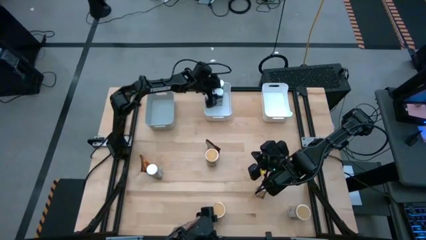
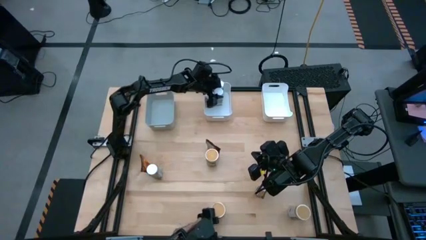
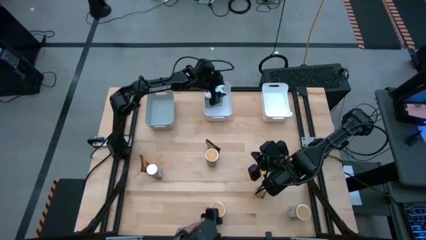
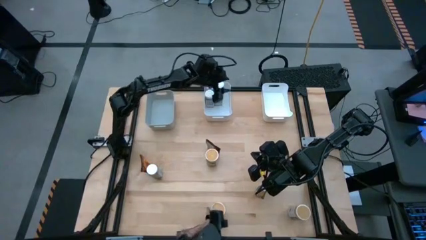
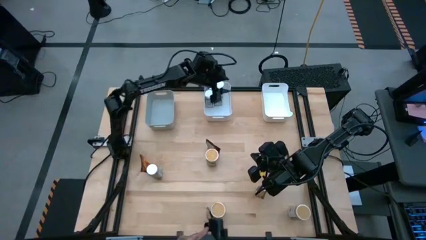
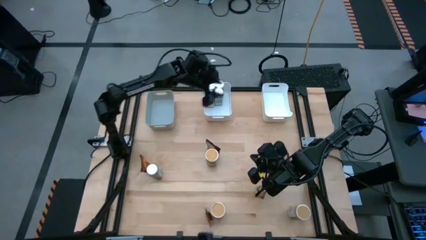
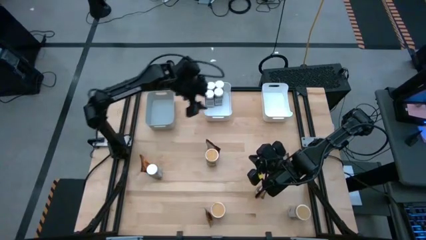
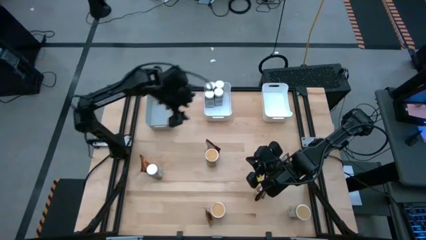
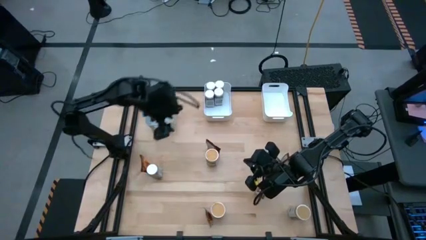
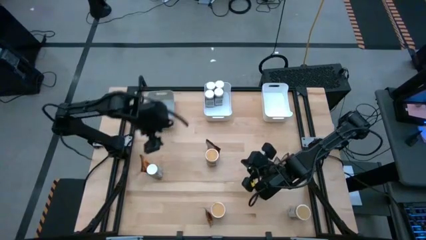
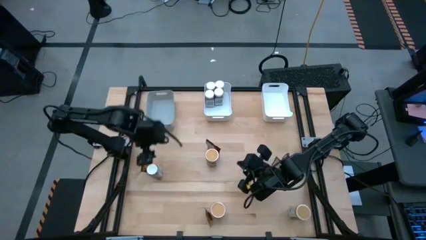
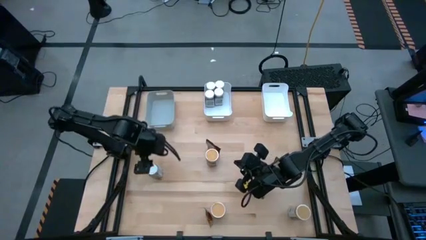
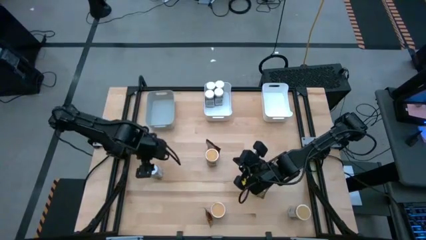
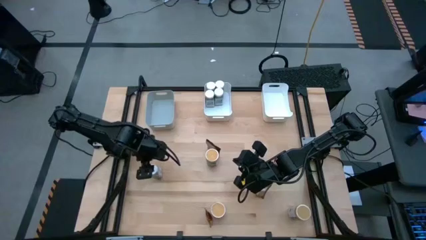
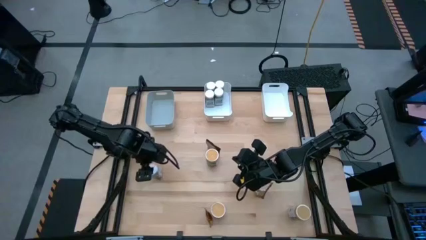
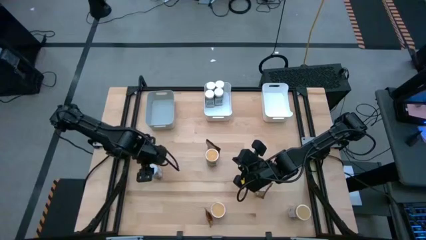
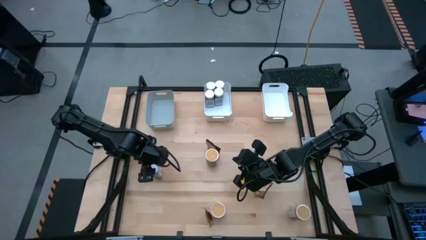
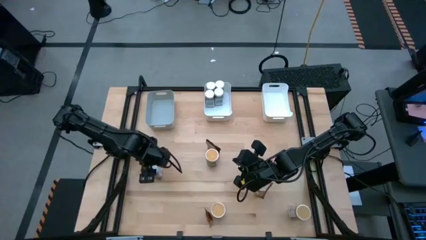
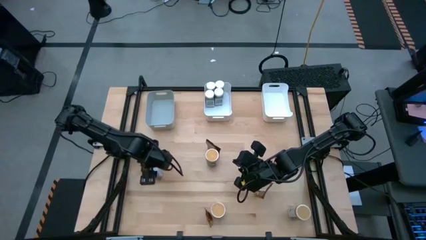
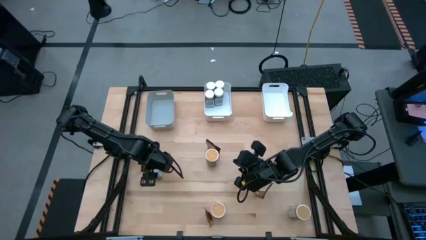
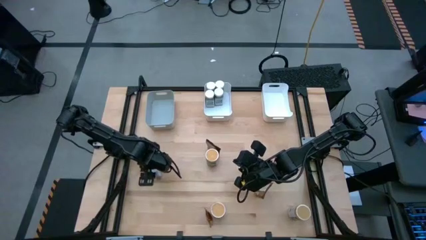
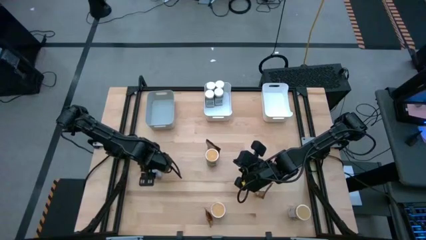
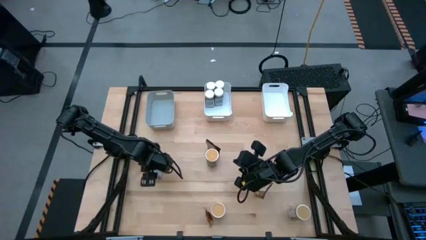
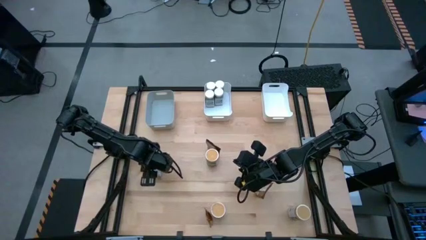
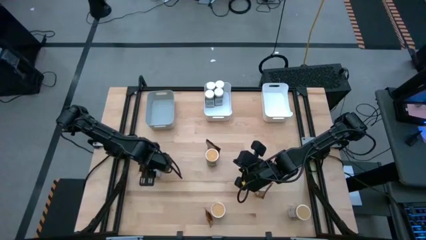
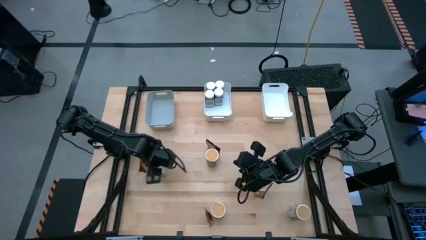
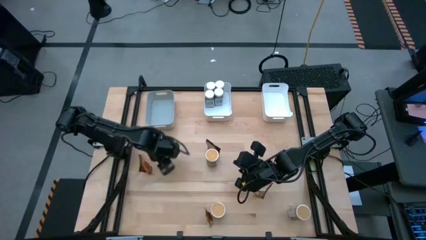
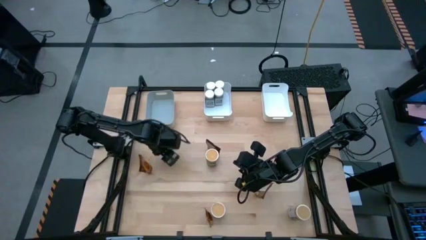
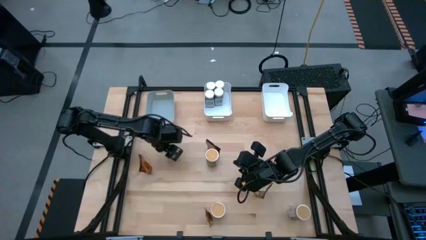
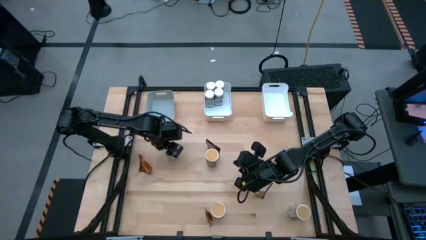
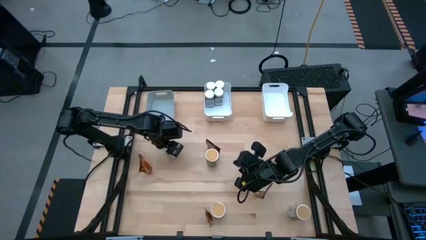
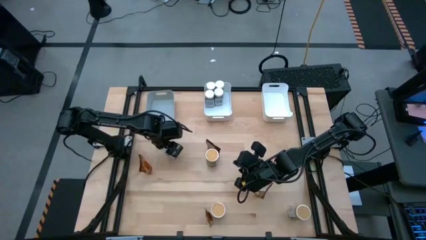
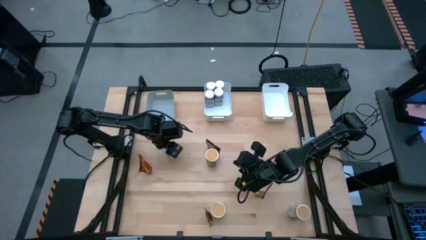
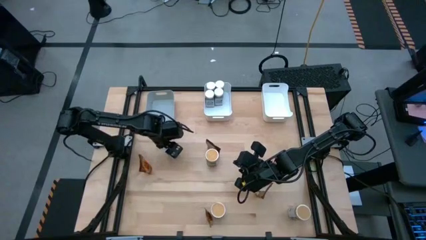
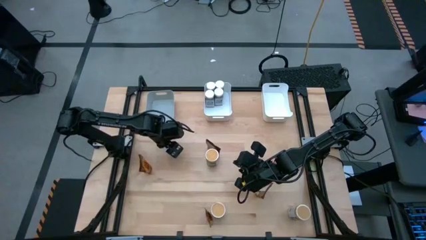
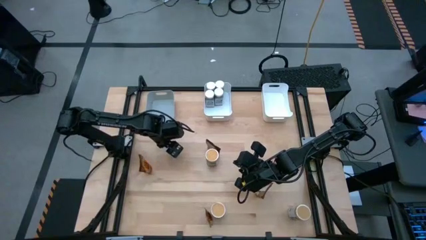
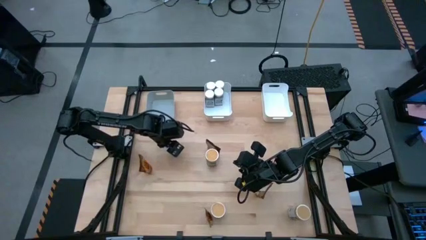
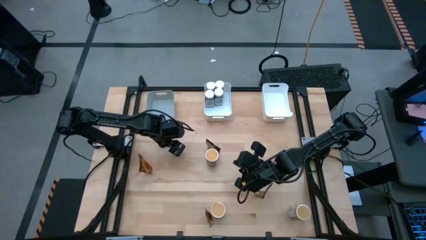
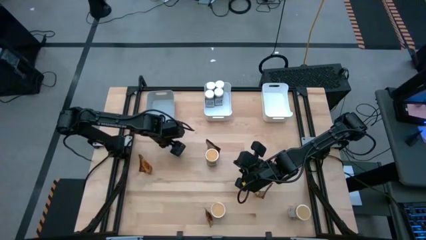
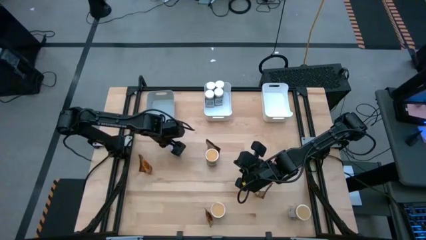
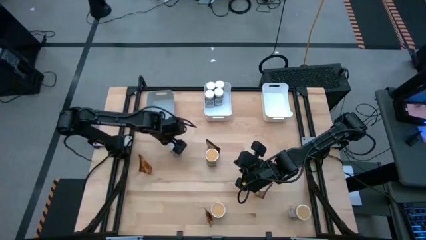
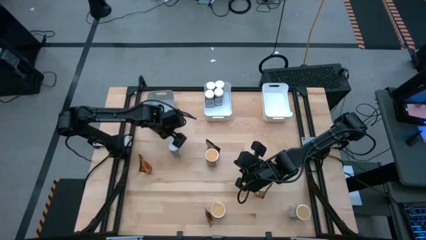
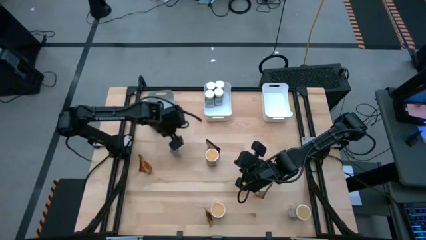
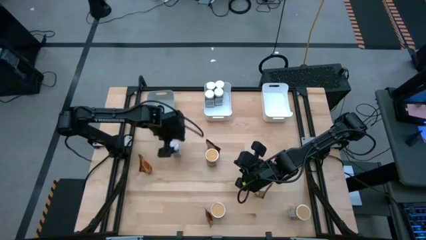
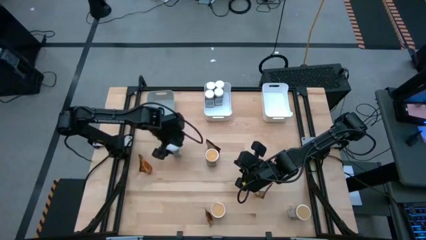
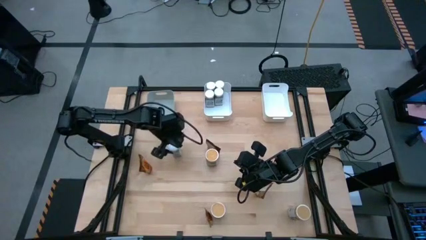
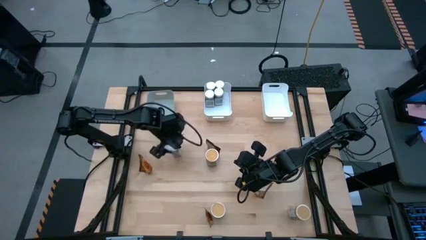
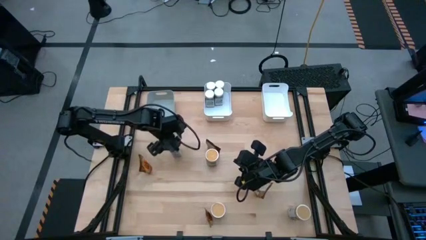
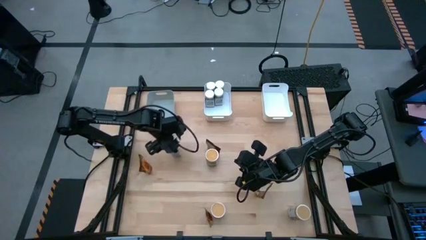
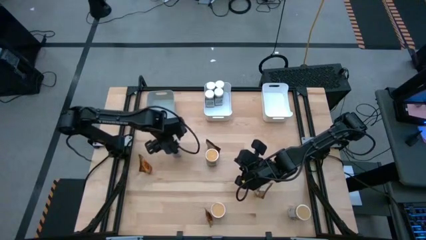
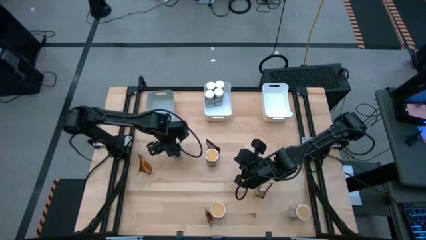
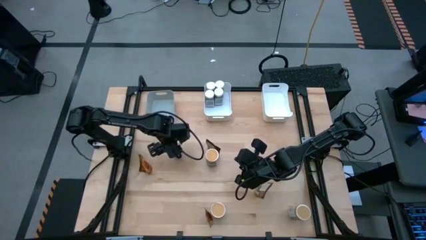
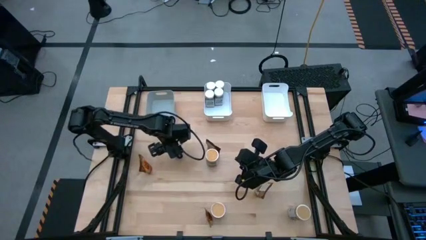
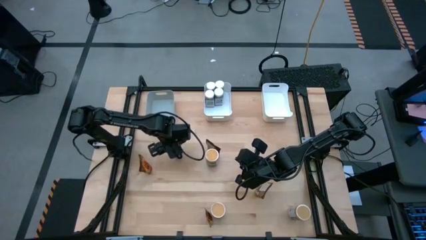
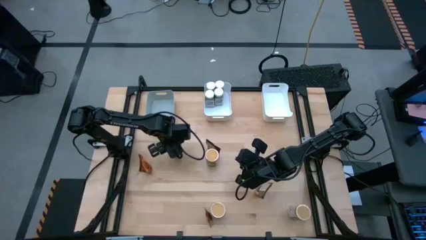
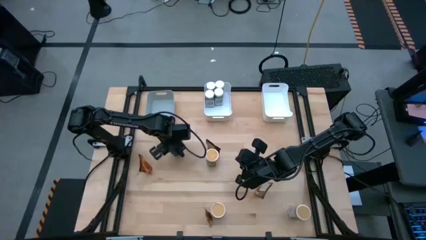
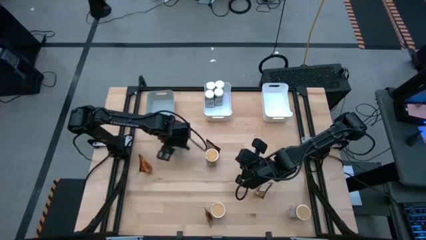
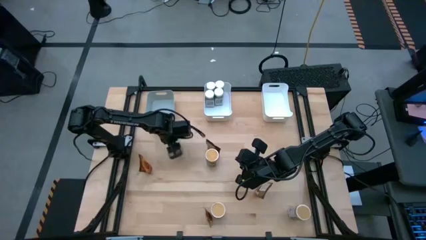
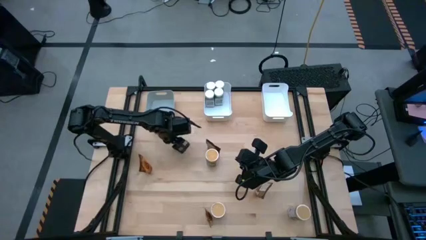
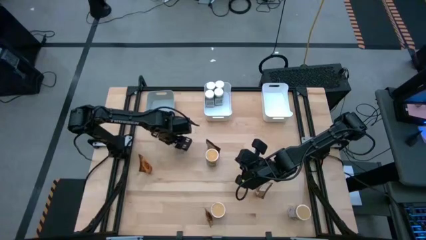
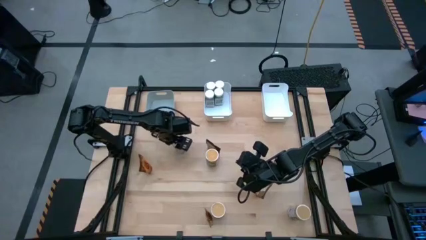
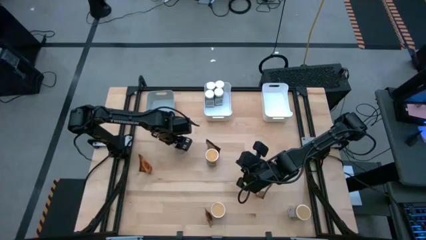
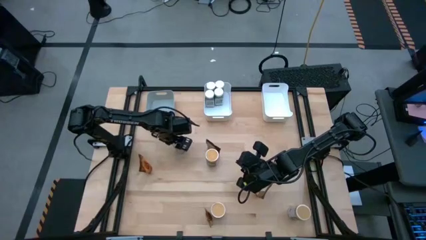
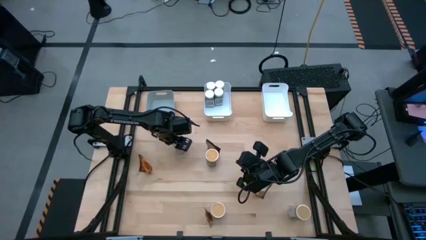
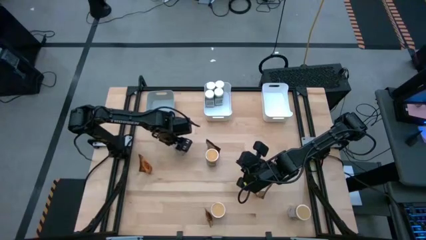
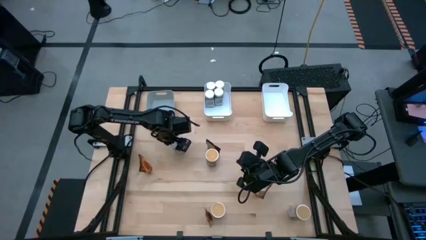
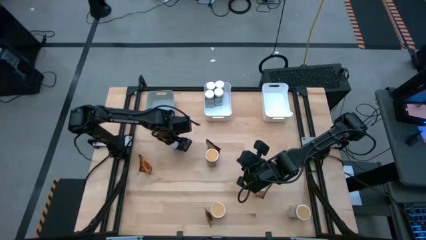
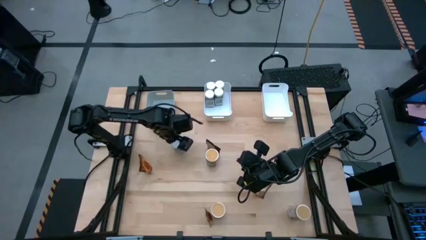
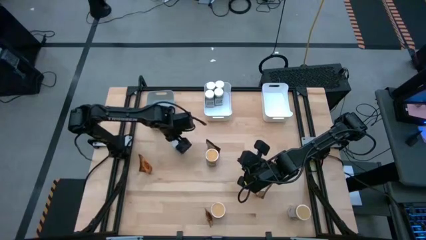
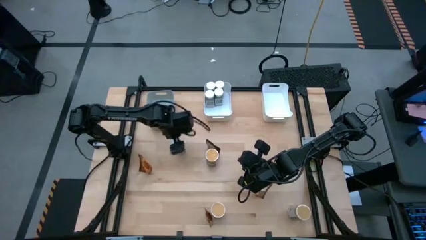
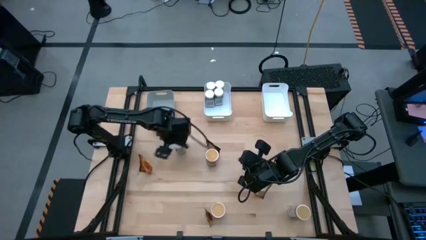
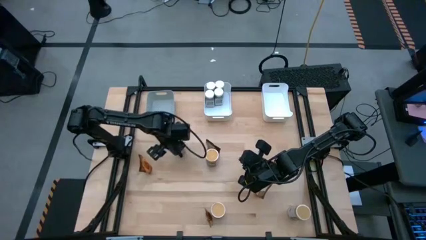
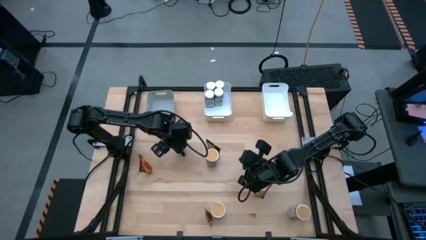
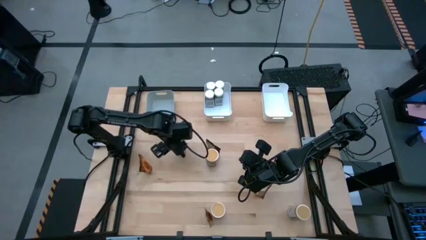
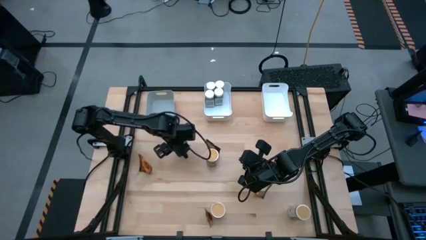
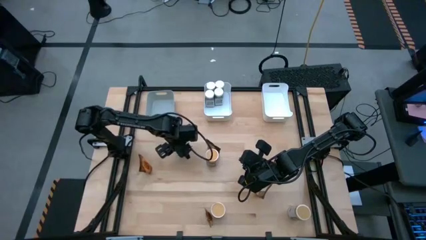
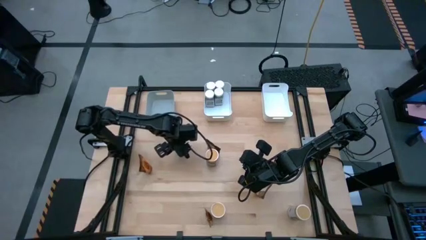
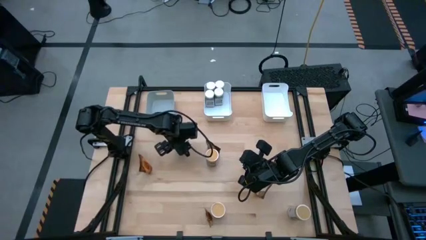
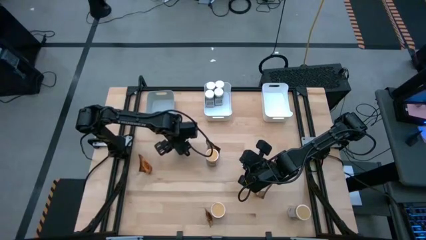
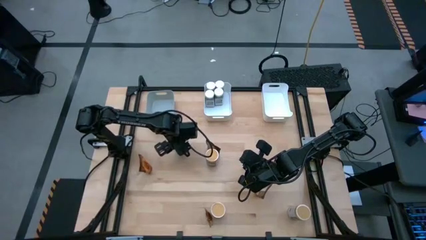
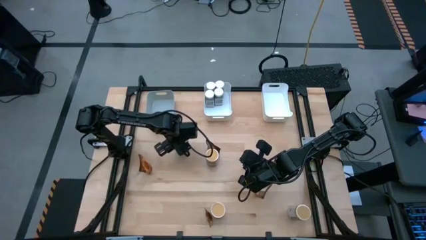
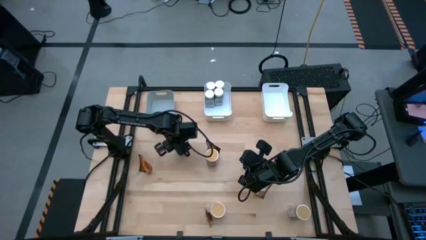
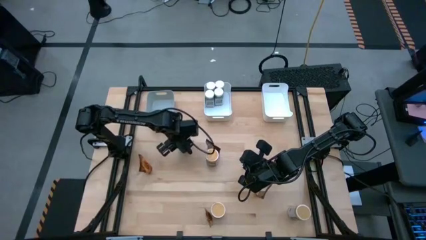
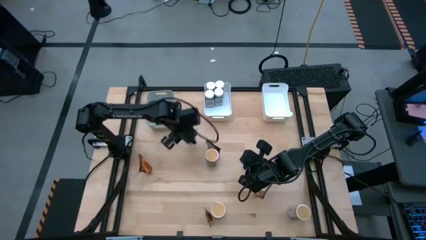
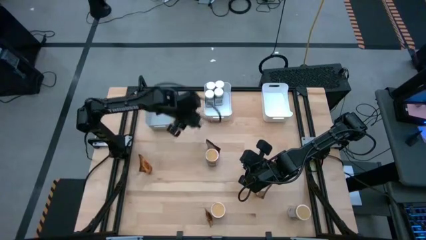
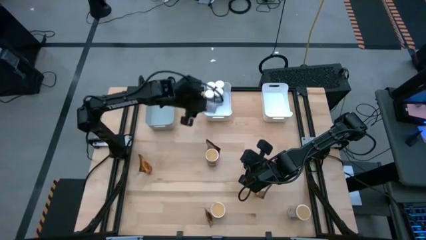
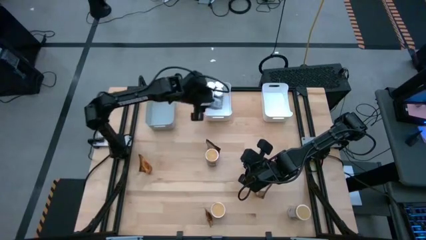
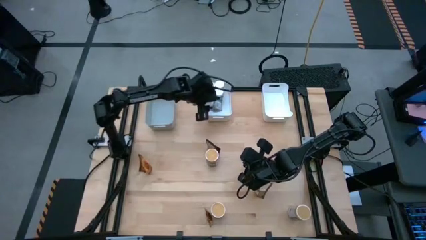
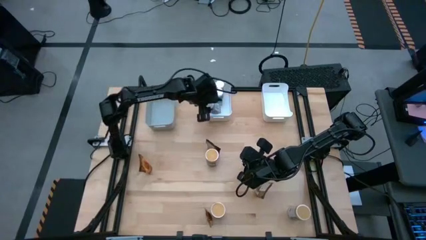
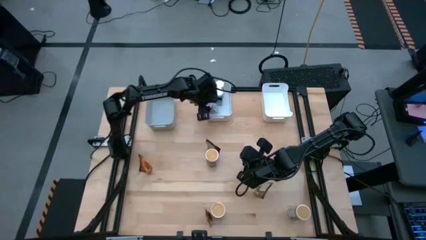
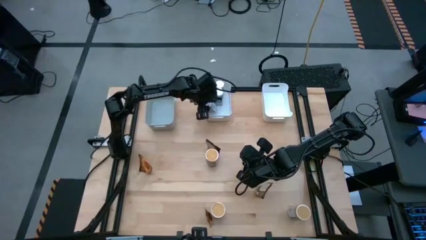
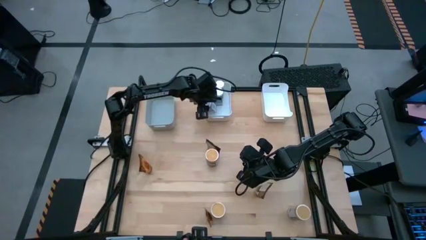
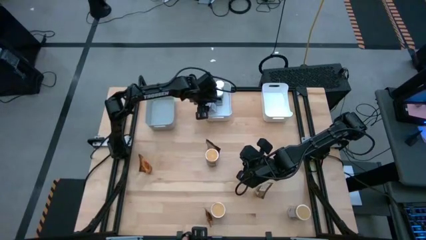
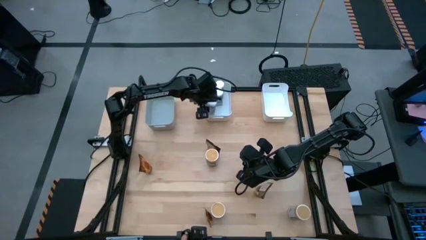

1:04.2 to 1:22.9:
Task: Sort spices by type
Put the white seasoning bottle into the left white bin
